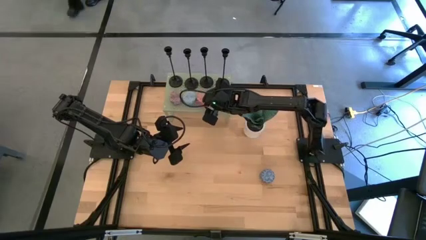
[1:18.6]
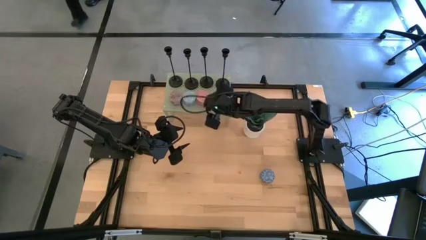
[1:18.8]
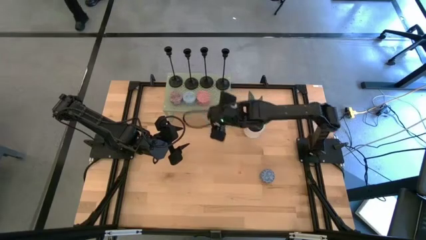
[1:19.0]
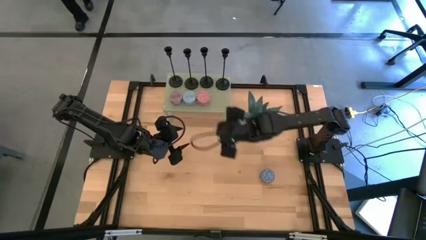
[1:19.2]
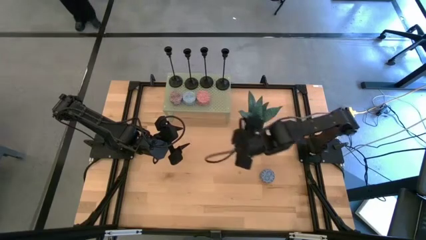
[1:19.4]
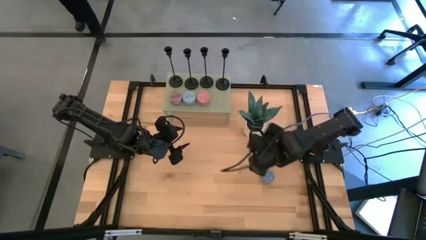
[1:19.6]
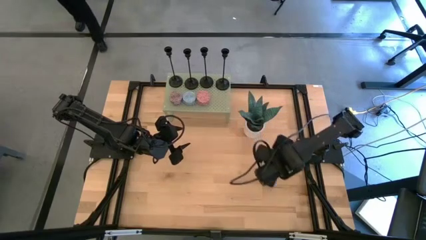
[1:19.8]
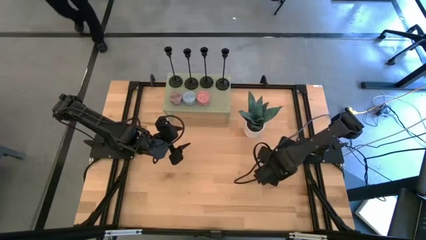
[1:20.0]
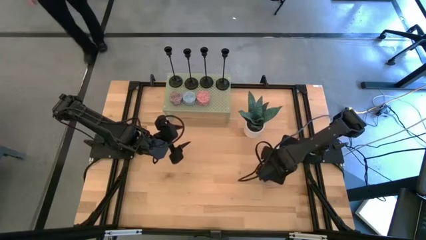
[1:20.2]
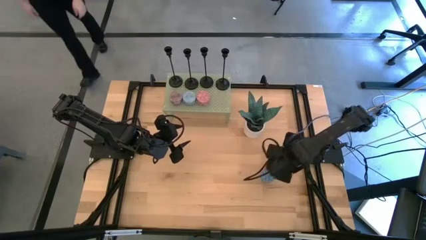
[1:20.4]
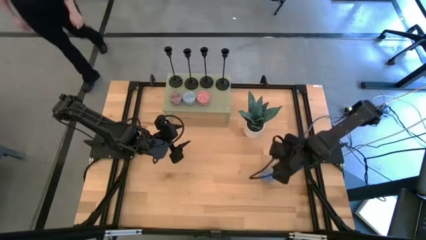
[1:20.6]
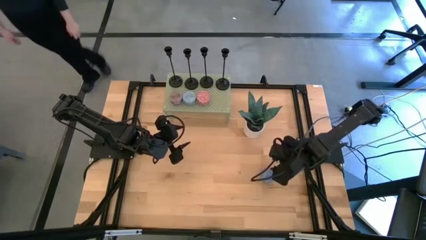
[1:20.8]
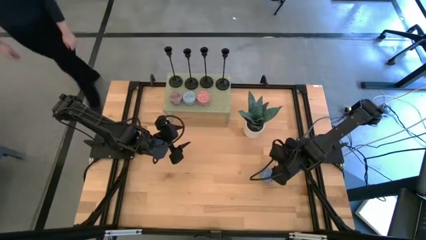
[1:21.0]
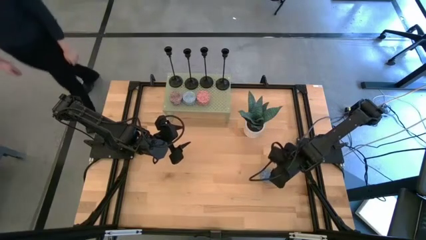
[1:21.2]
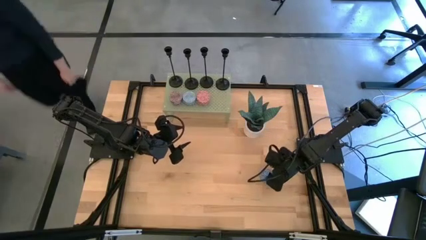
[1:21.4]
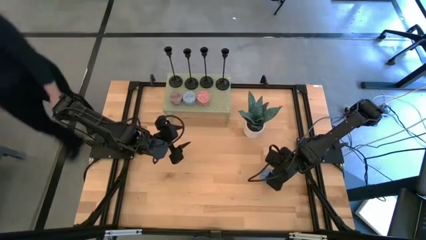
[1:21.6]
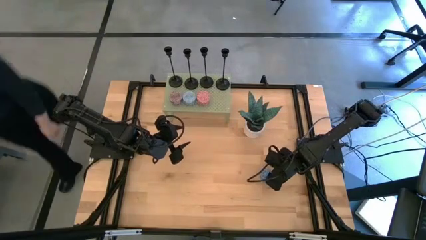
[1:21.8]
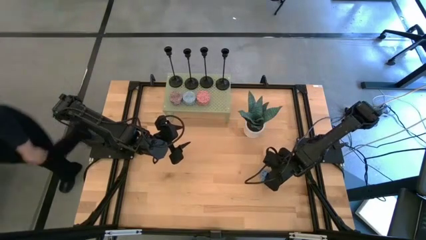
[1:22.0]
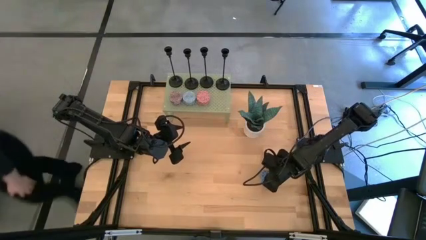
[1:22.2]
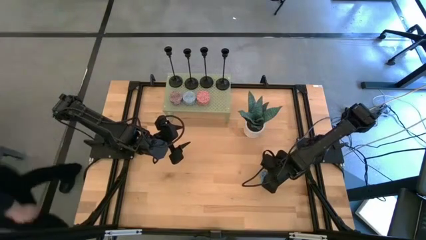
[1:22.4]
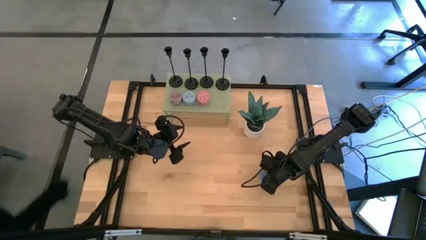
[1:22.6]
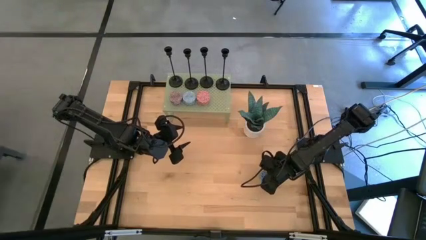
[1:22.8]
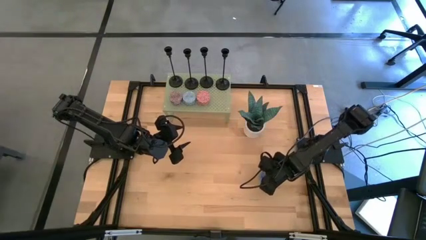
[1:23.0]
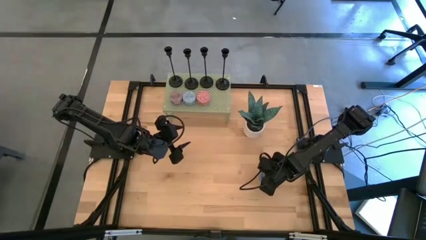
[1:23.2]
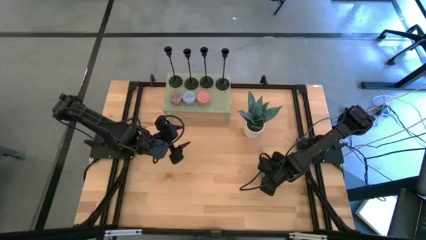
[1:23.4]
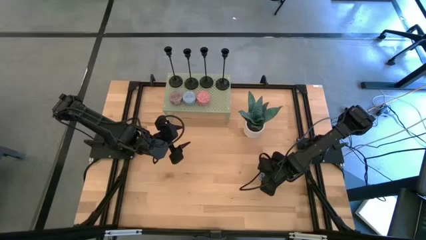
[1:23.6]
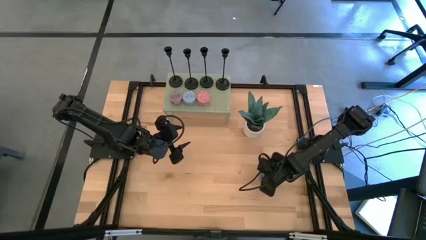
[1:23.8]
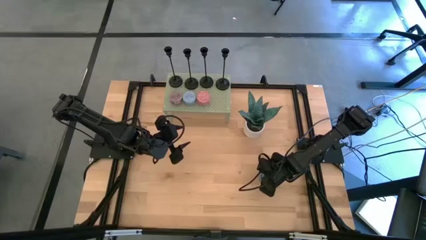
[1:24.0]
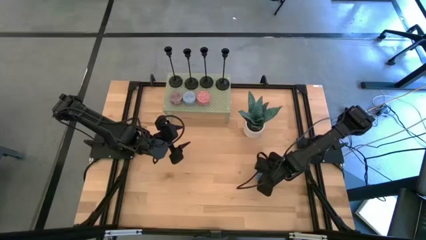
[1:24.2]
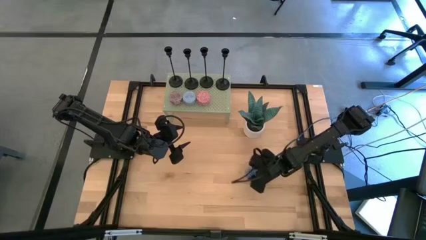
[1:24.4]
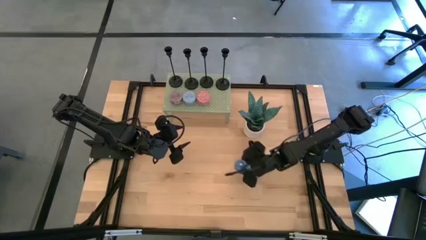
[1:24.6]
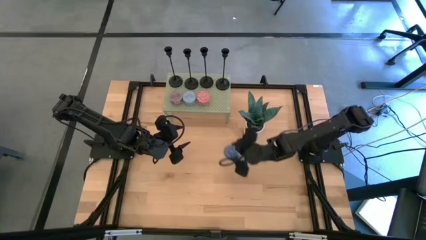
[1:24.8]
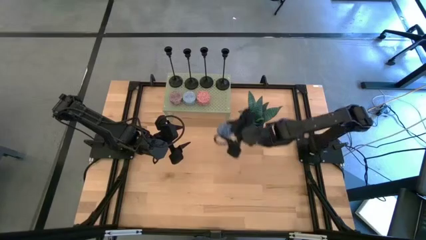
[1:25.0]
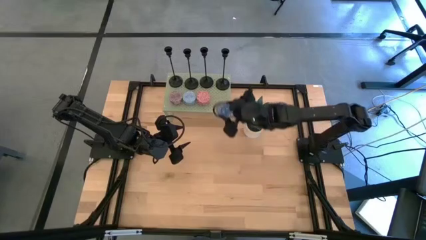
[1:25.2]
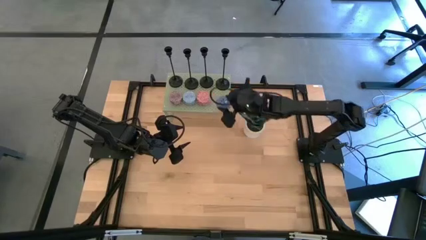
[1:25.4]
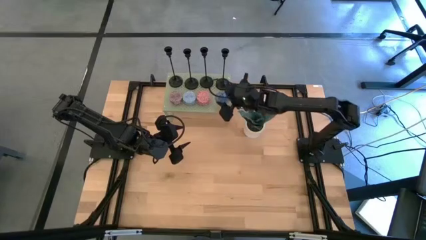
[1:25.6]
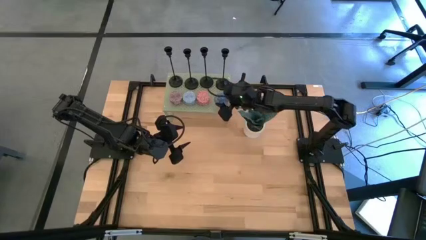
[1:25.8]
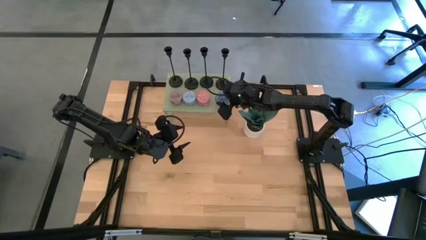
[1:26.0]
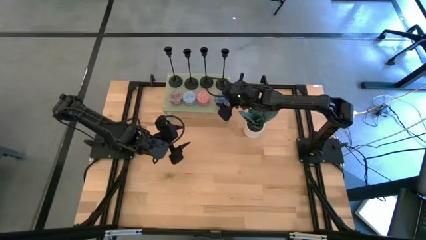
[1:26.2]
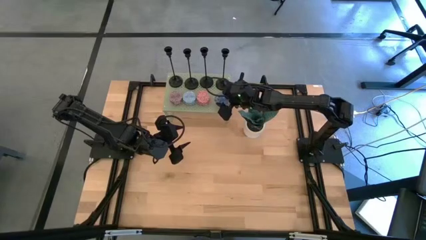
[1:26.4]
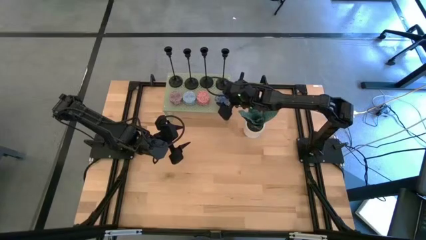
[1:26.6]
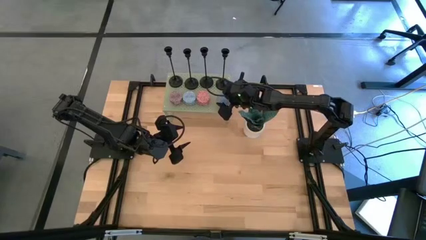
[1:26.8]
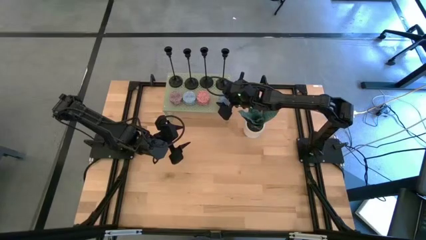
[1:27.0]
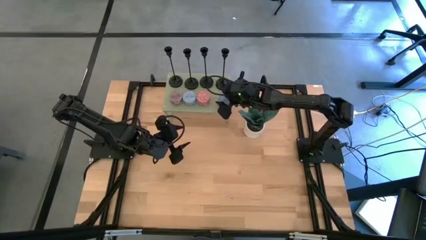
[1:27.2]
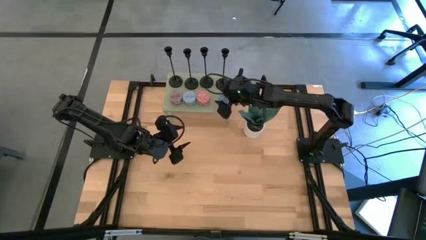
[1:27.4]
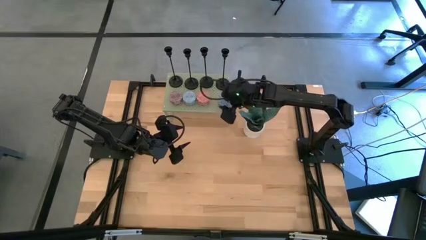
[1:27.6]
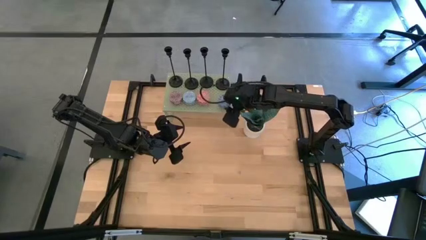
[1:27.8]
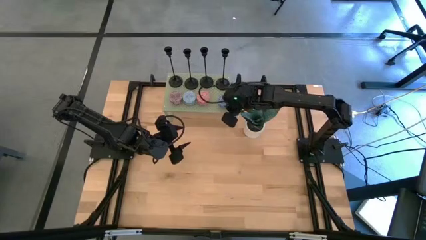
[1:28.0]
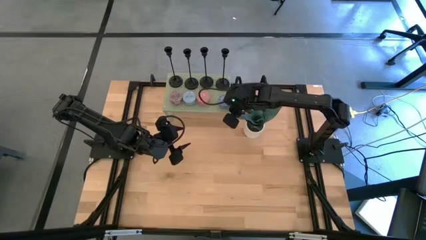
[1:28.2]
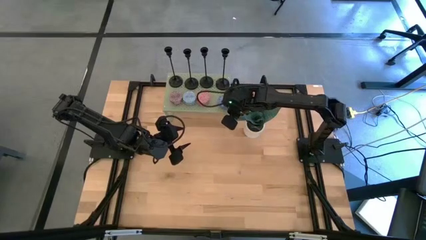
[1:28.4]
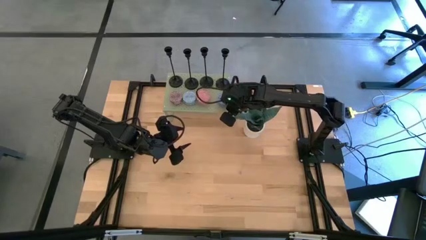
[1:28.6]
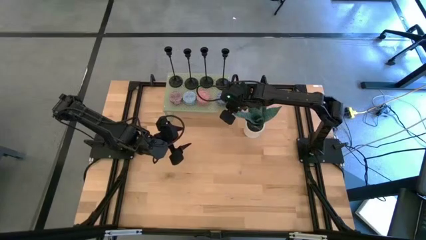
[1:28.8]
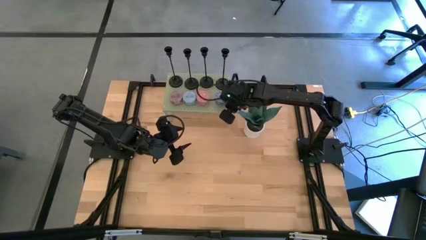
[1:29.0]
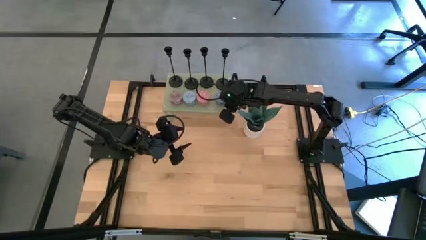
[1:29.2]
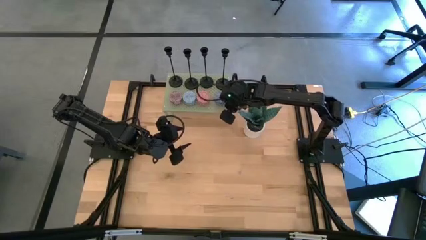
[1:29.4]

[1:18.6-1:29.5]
Task: Pick & Place candle stick holders
Put the blue scented candle on the shelf
